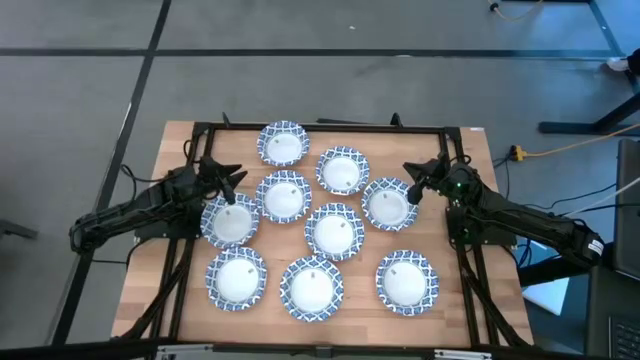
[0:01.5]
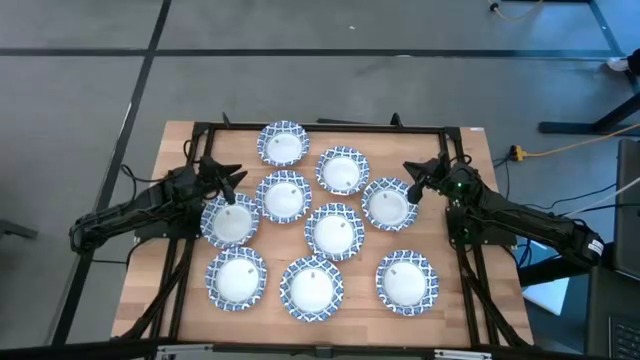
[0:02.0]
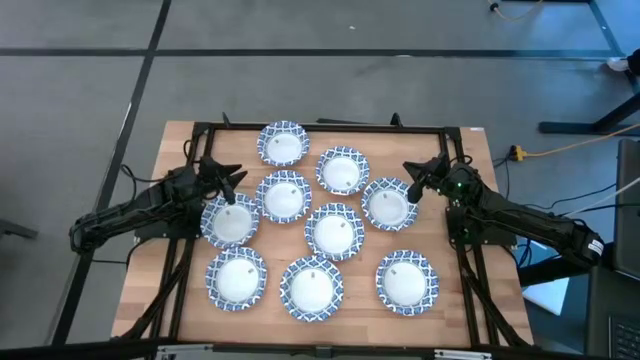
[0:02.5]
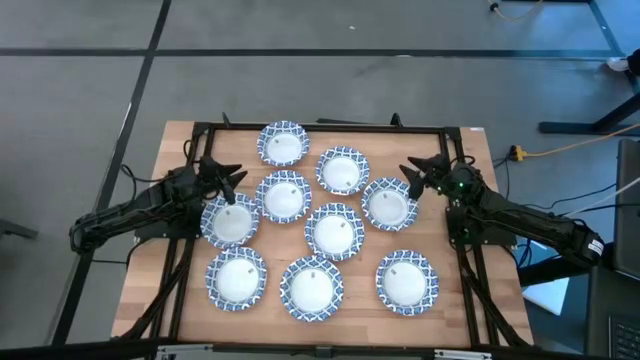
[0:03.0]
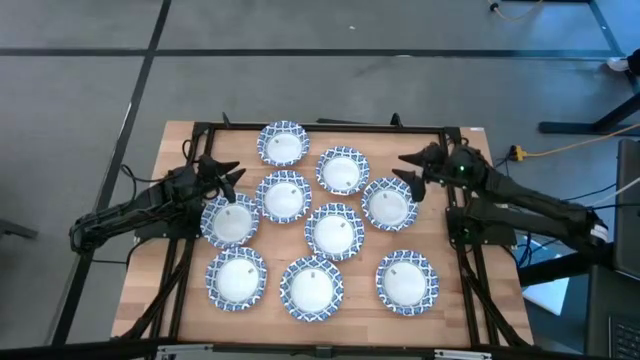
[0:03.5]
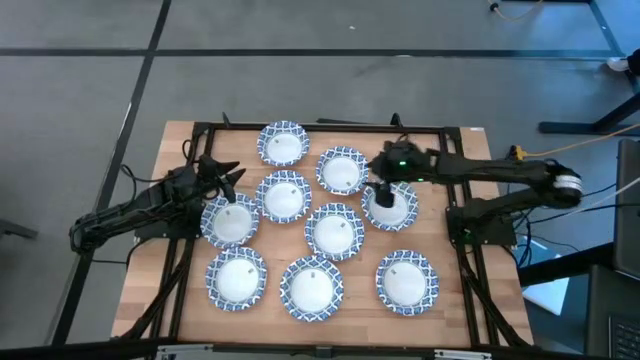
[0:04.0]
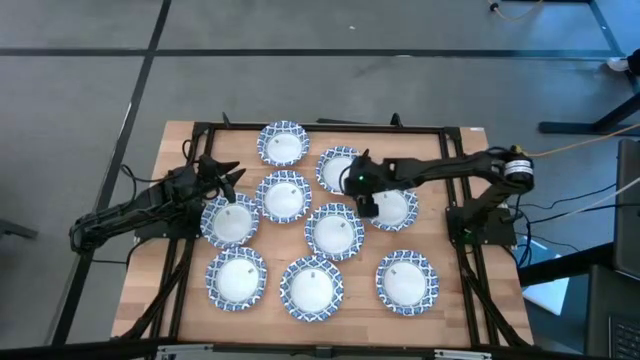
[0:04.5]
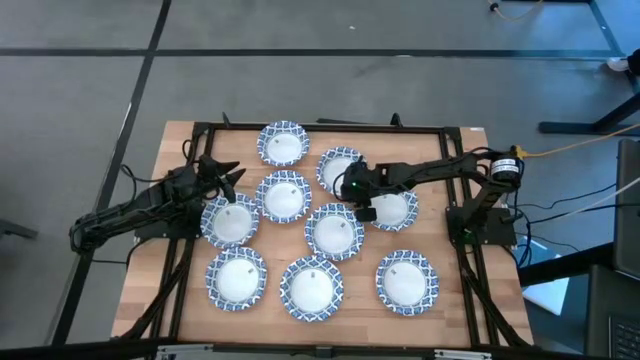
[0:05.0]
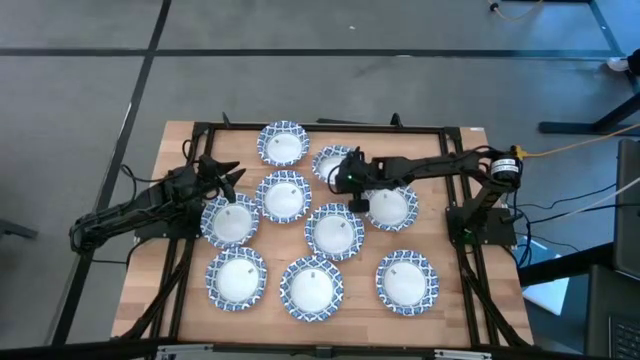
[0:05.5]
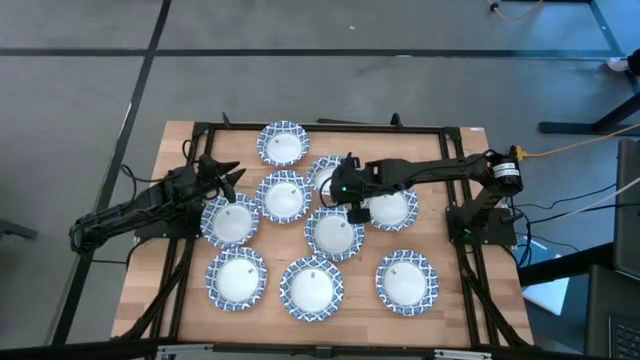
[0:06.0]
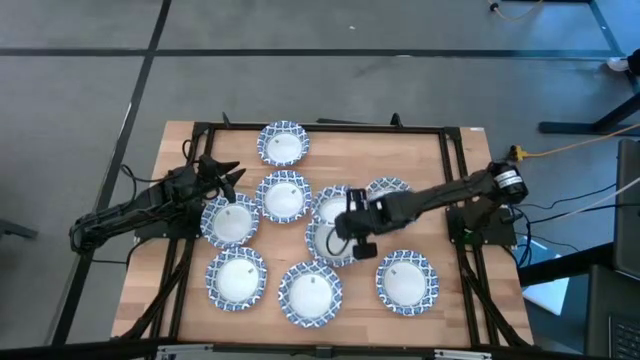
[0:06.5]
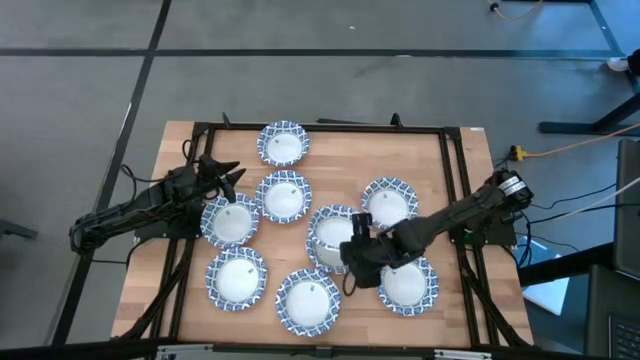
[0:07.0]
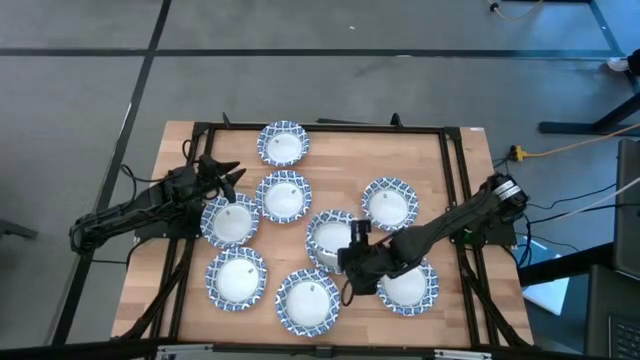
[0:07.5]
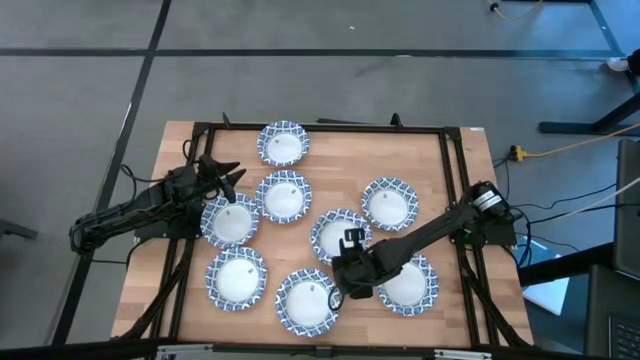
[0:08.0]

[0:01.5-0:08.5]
Task: Nest bowls inside each other
Stack the white bowl on top of the other white bowl

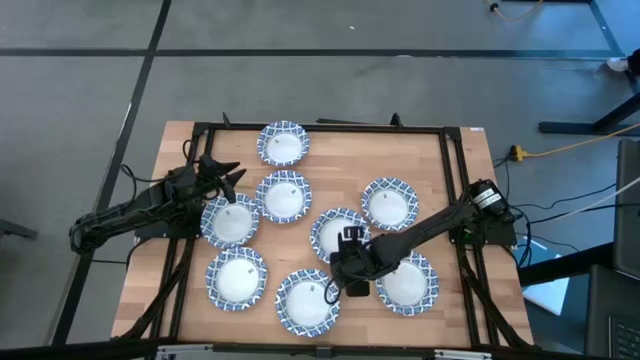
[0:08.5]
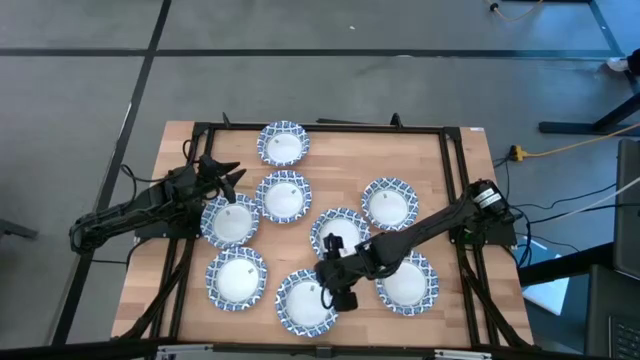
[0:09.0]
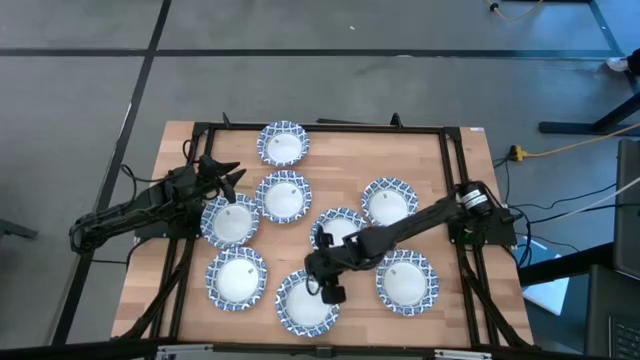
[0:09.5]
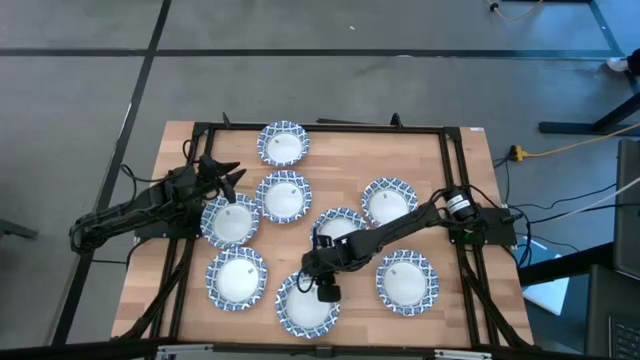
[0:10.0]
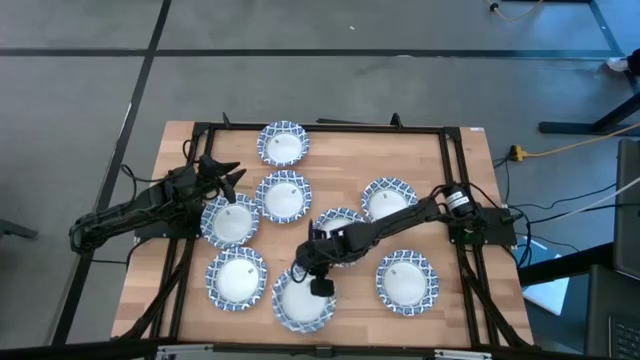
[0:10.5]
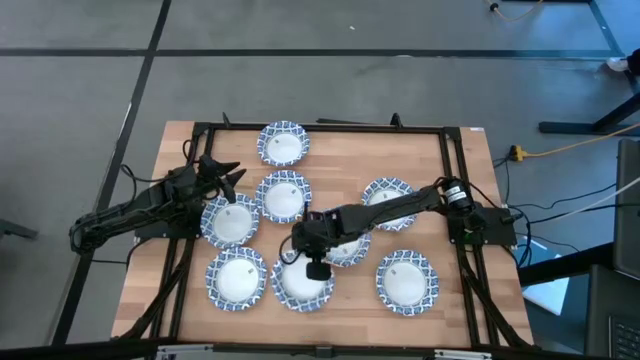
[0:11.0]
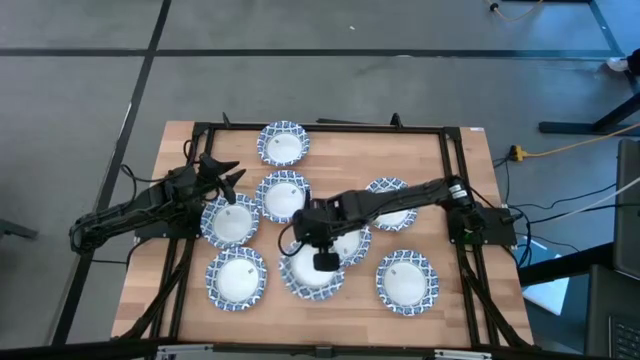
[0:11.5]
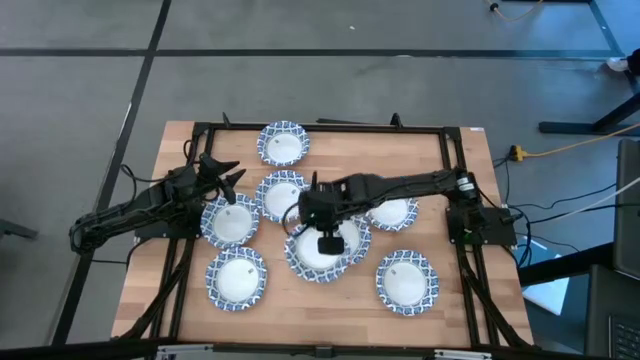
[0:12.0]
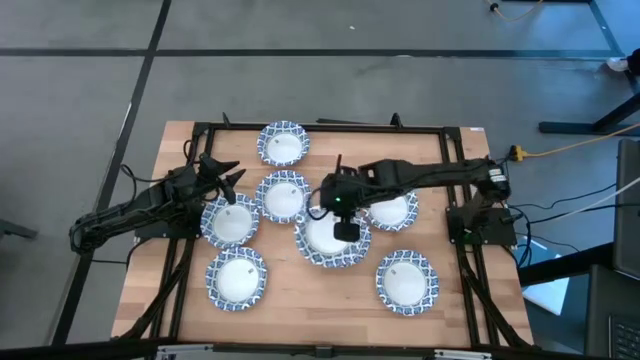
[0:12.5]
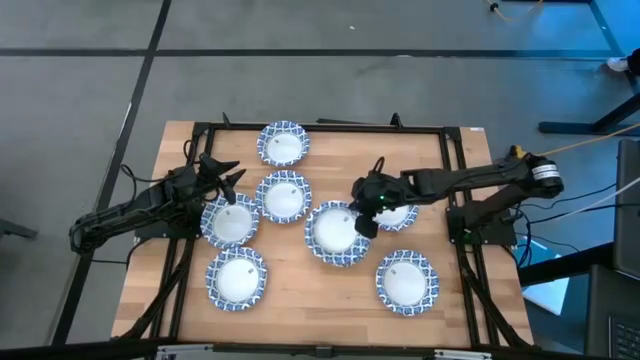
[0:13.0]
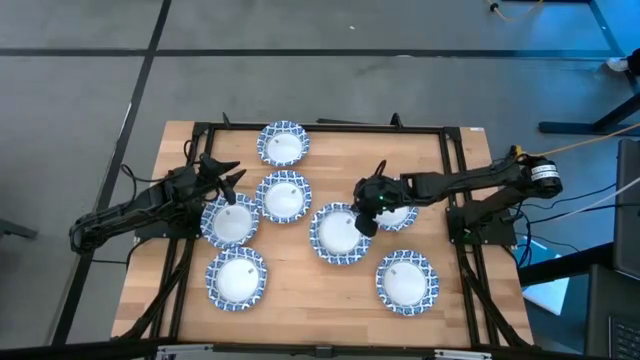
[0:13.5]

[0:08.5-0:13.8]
Stack the white bowl on top of the other white bowl

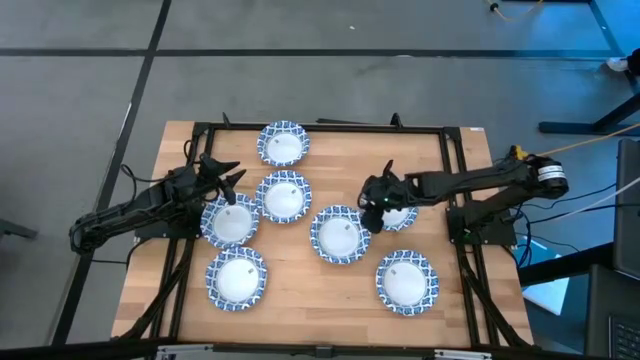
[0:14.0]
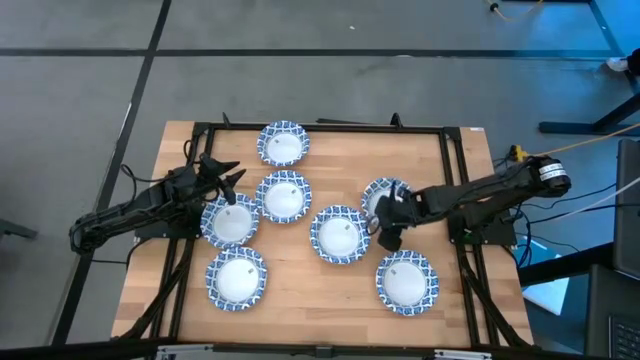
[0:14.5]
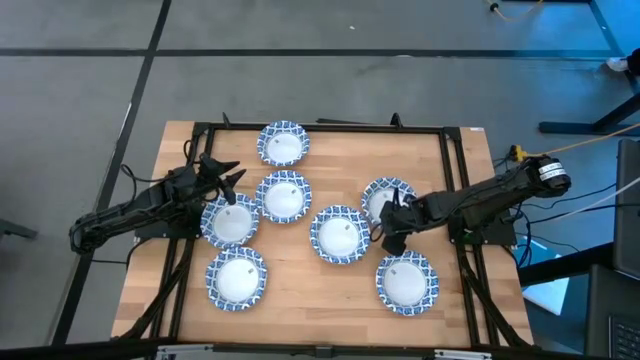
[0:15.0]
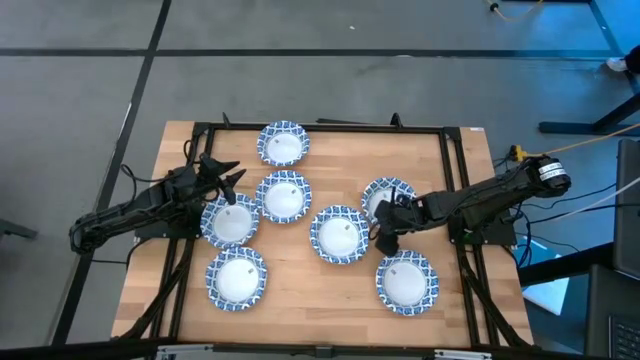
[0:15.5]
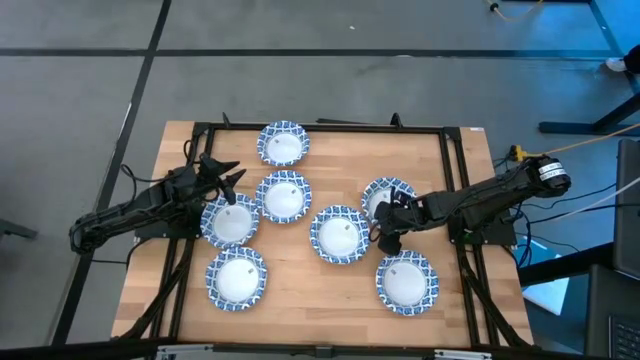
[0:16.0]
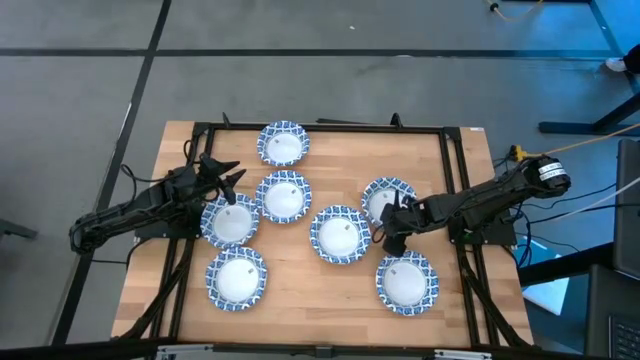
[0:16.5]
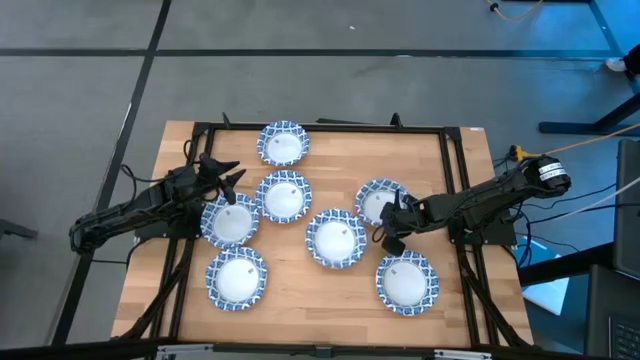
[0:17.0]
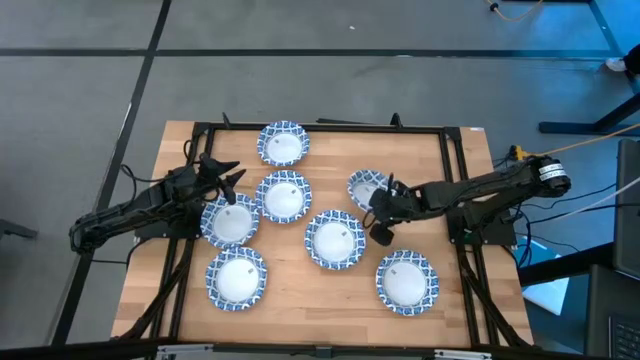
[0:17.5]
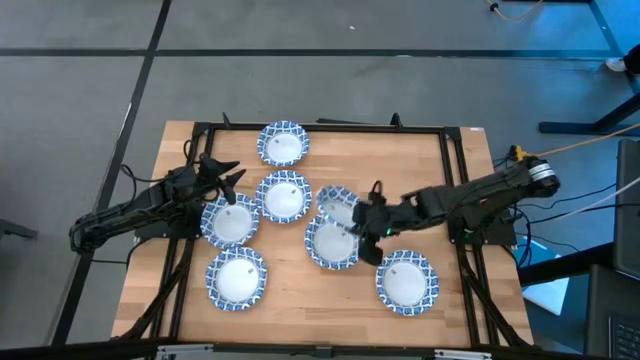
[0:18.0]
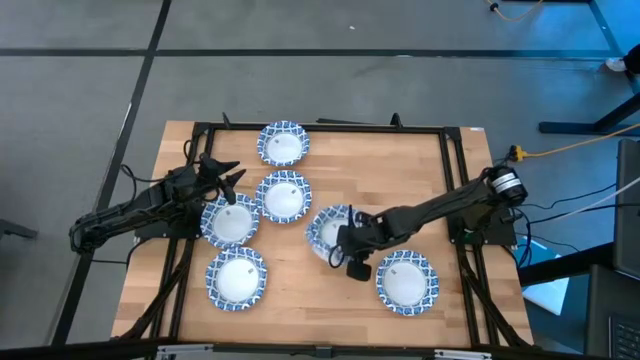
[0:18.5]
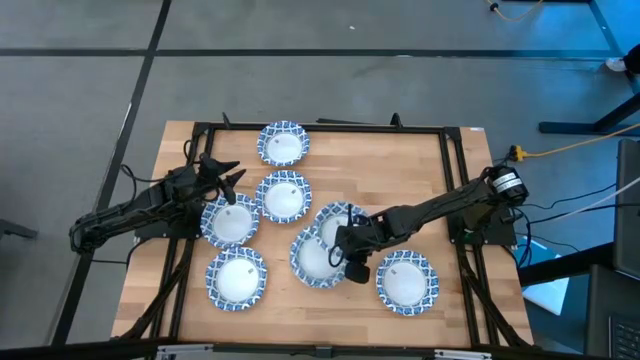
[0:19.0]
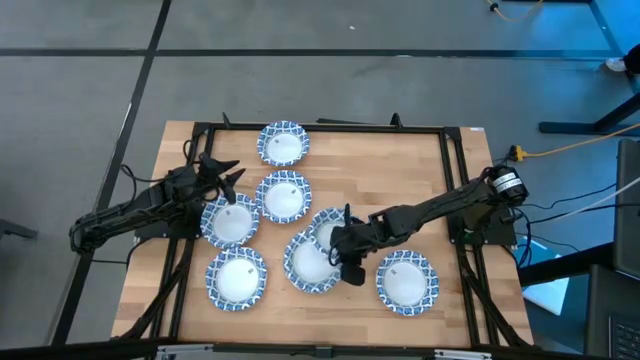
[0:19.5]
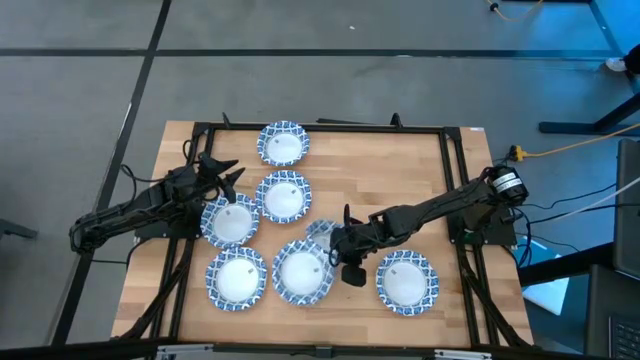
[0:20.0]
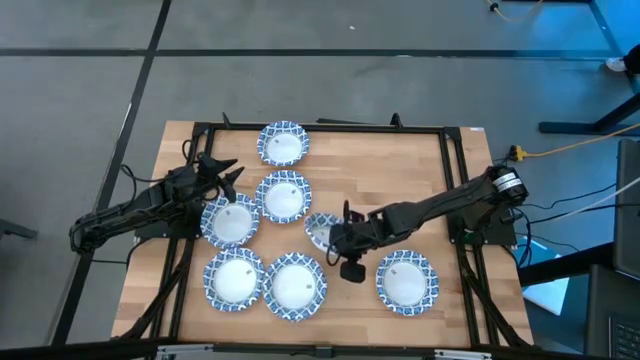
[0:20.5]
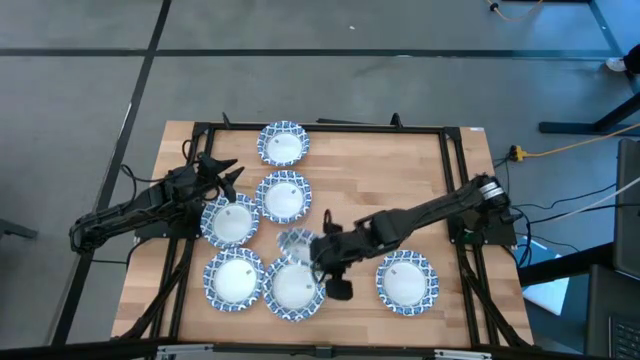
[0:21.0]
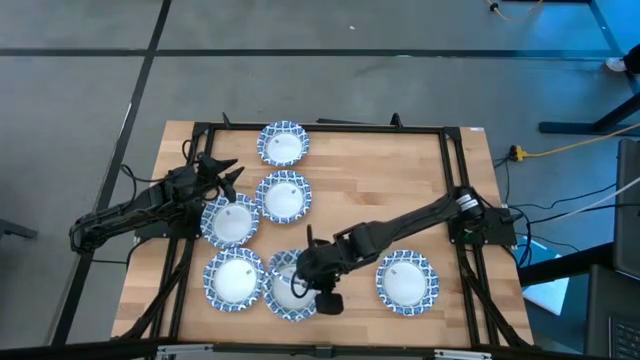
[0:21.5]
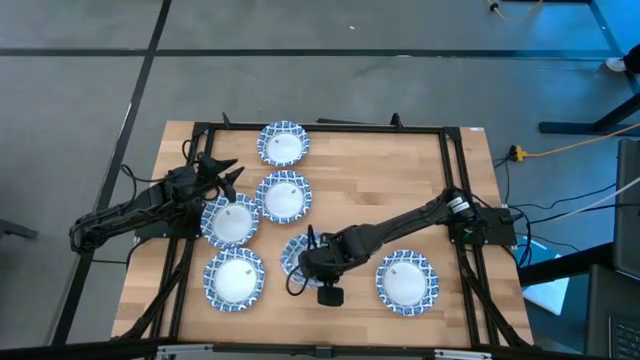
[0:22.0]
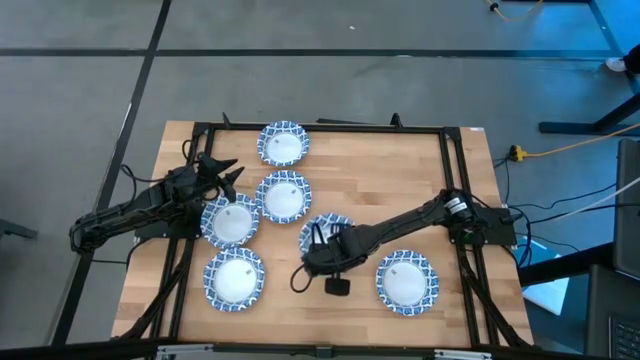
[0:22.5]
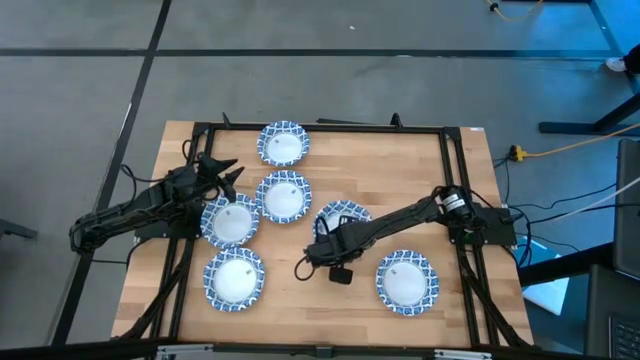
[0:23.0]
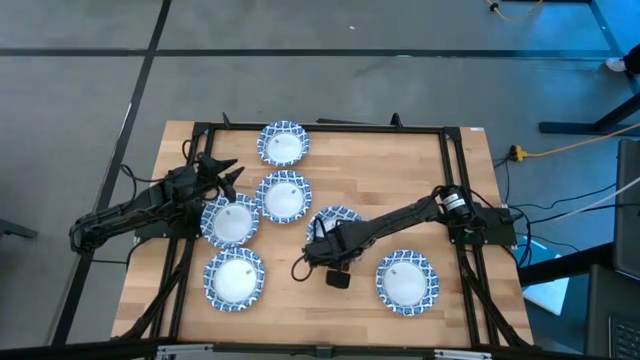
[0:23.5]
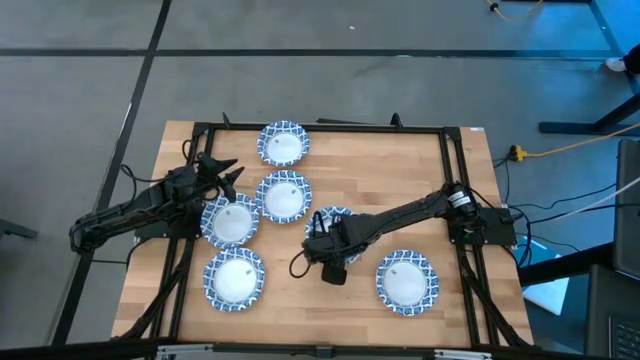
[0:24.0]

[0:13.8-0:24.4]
Stack the white bowl on top of the other white bowl
